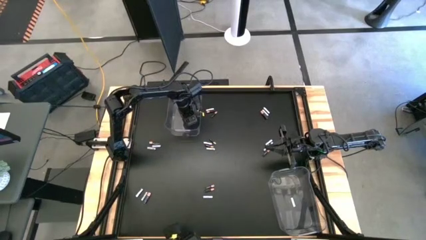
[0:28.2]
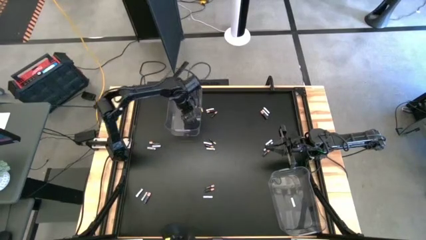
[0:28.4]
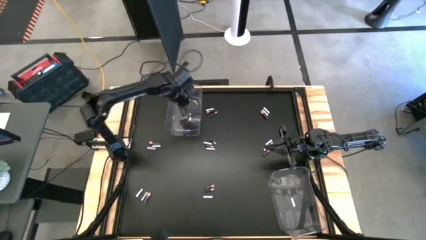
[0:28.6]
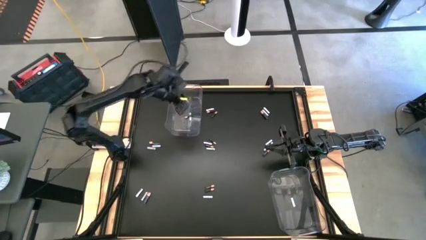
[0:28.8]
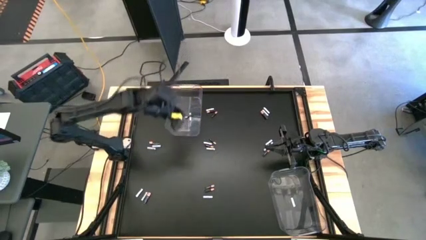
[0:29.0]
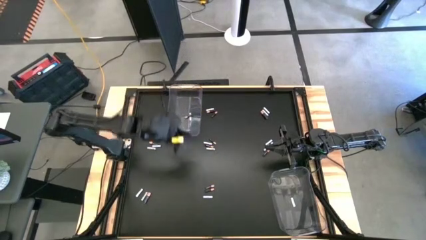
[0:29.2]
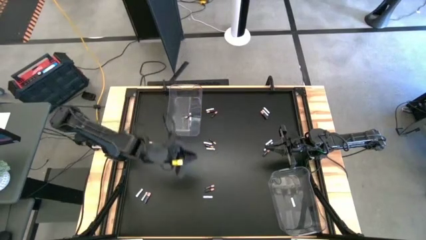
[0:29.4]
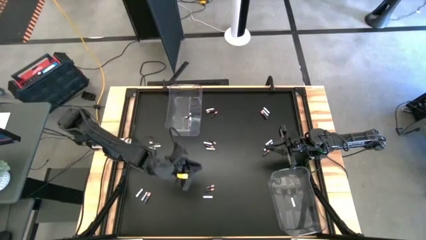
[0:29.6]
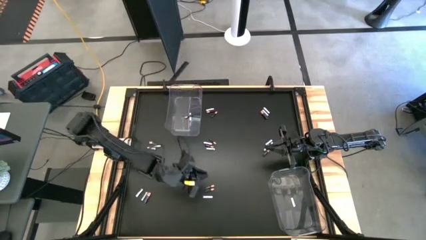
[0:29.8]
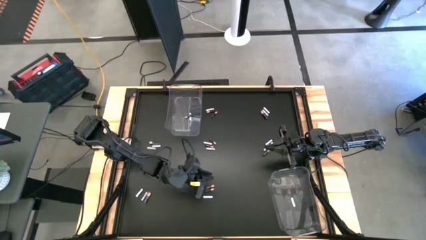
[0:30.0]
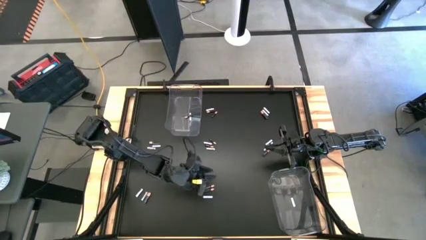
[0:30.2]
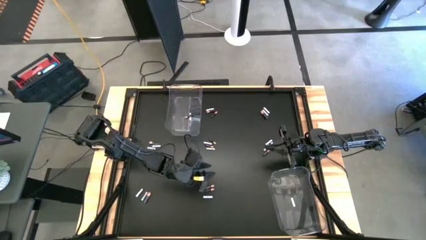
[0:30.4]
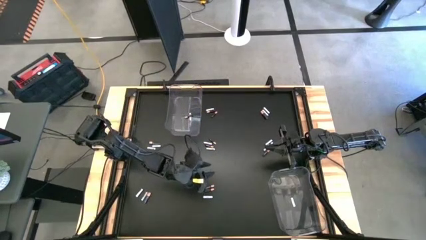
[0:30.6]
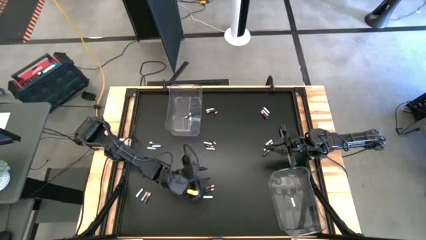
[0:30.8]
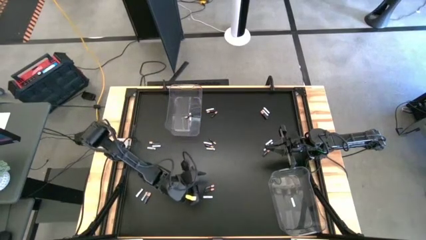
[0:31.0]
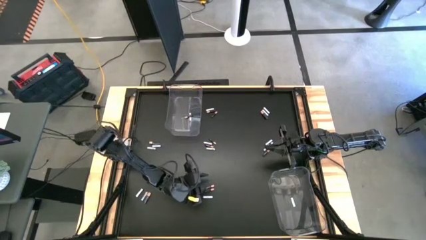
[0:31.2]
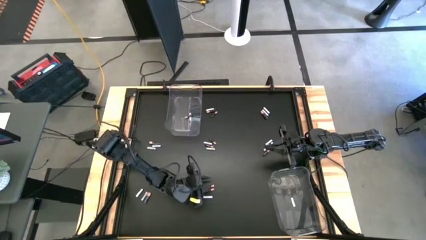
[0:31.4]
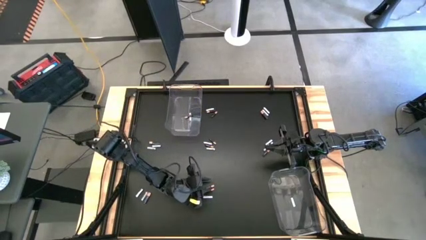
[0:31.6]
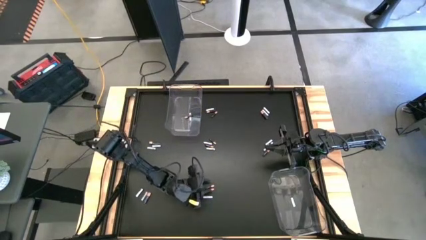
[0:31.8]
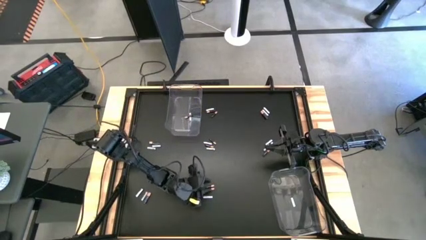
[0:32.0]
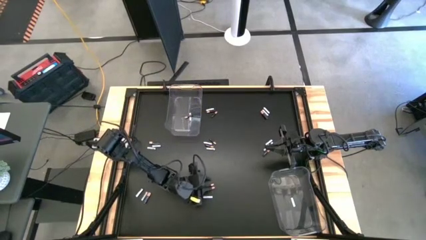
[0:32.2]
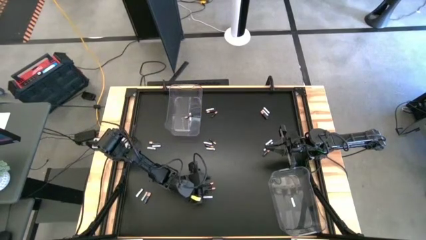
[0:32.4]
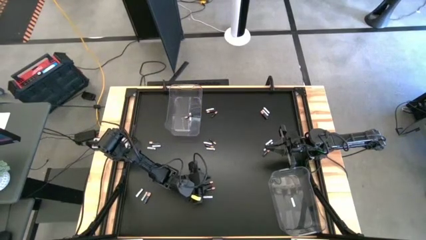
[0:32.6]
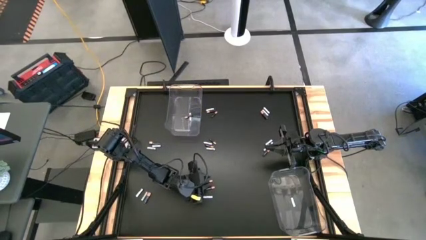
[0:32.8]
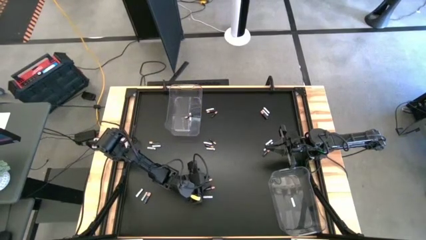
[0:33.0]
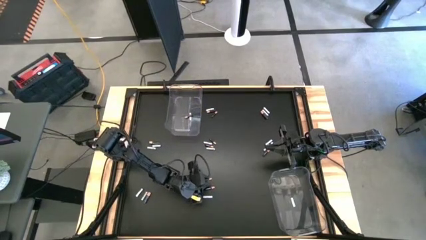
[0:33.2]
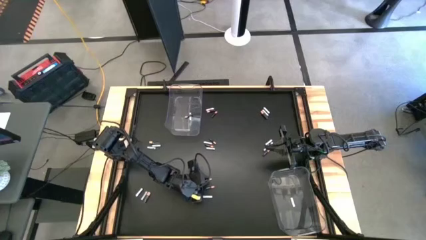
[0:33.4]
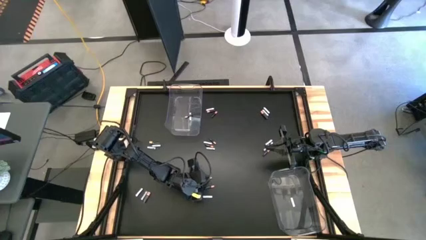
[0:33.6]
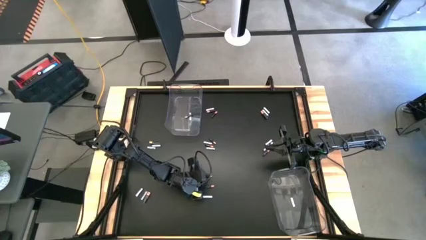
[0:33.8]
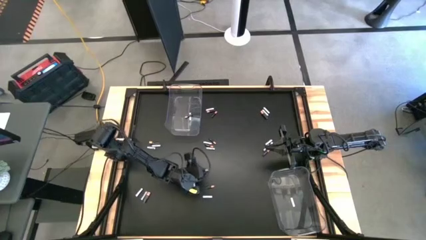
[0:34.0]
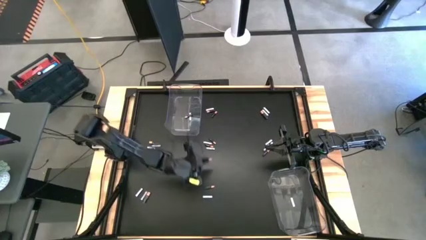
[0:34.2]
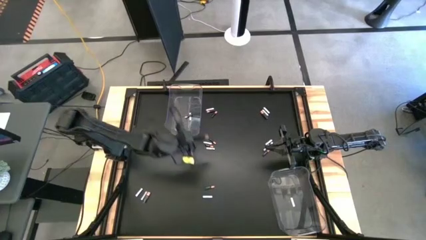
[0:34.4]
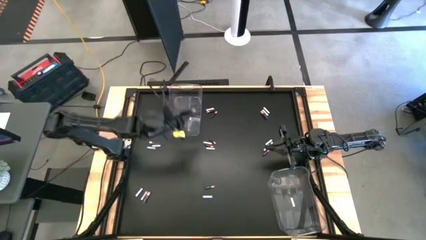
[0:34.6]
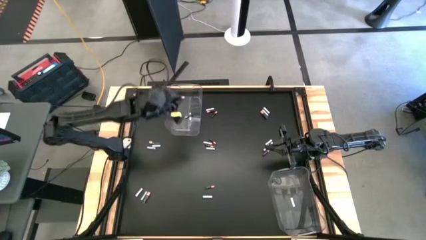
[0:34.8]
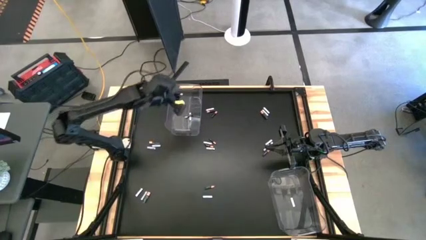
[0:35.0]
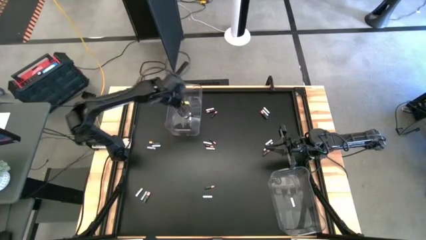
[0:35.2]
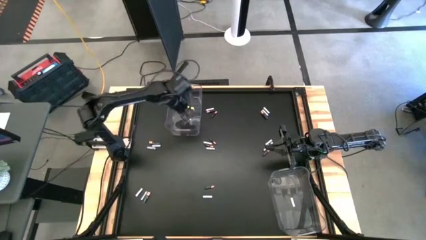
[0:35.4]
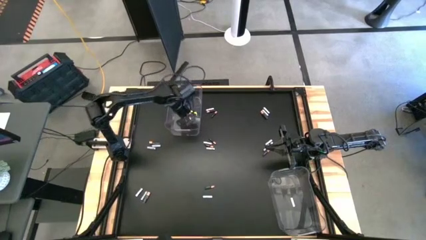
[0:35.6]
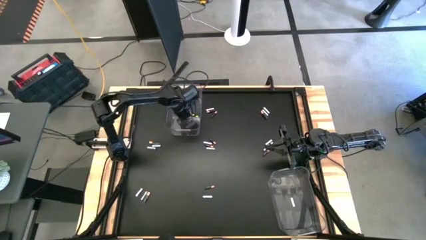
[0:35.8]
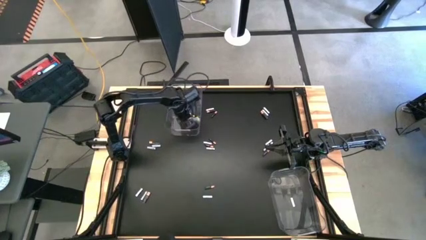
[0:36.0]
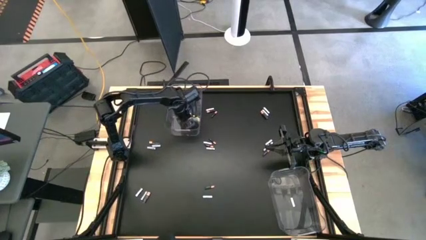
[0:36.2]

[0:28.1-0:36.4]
Task: Sort batteries
Put the black battery into the top transparent bin

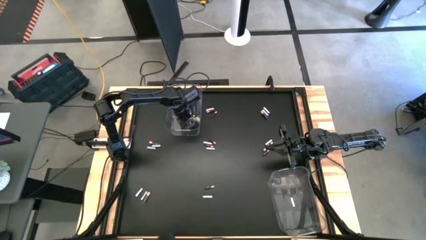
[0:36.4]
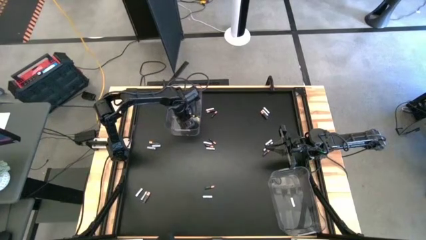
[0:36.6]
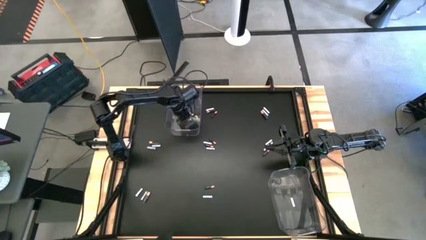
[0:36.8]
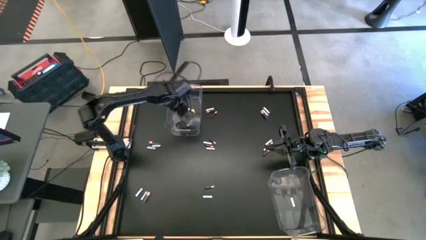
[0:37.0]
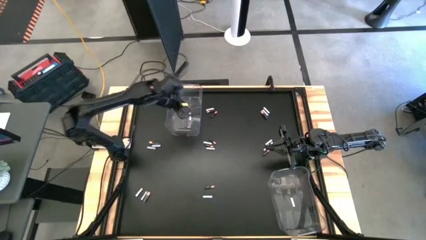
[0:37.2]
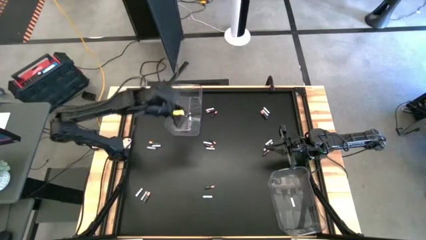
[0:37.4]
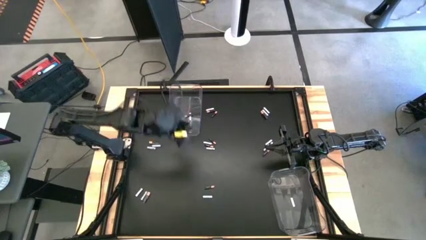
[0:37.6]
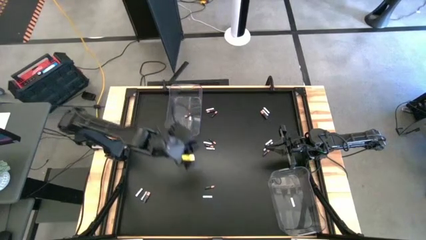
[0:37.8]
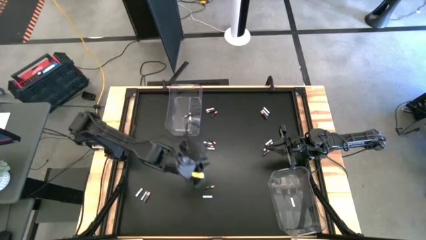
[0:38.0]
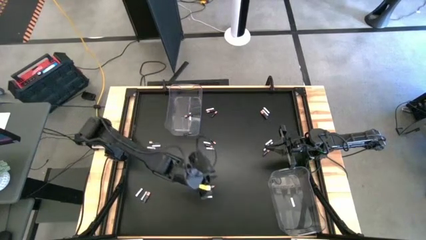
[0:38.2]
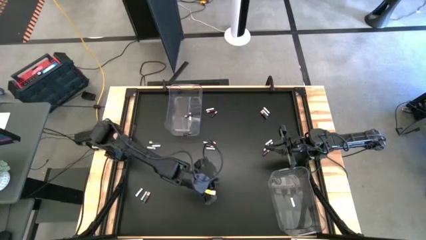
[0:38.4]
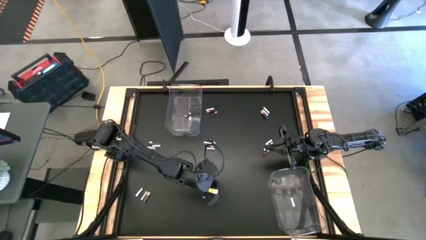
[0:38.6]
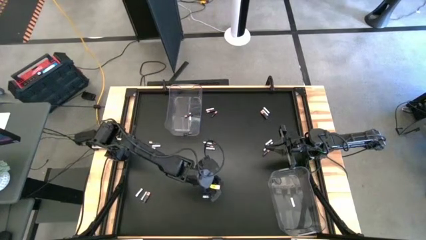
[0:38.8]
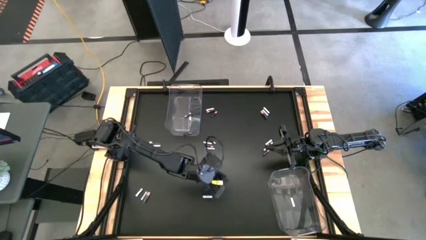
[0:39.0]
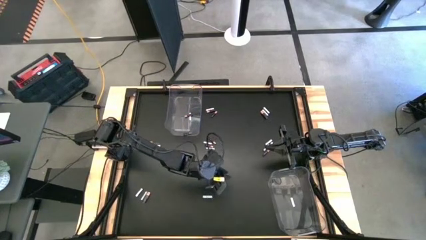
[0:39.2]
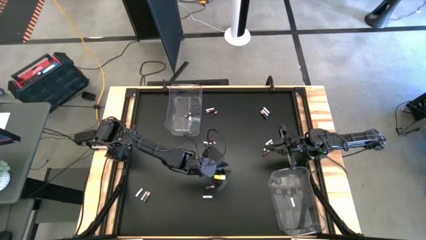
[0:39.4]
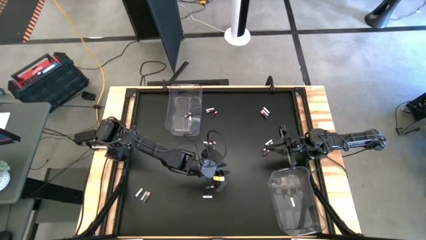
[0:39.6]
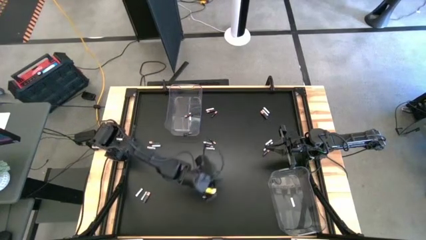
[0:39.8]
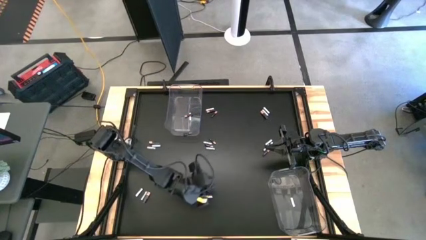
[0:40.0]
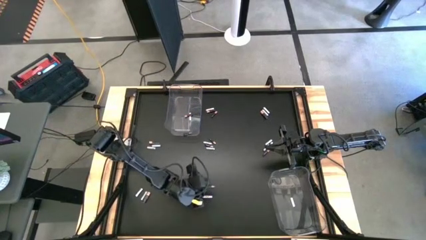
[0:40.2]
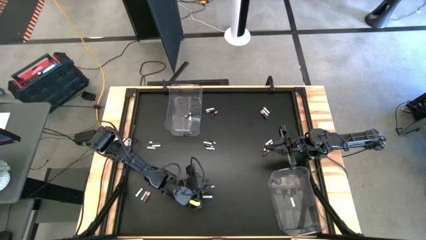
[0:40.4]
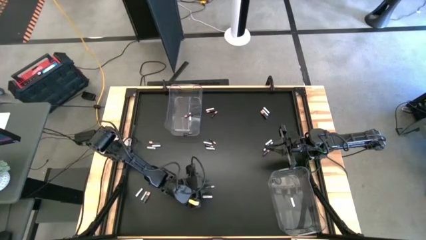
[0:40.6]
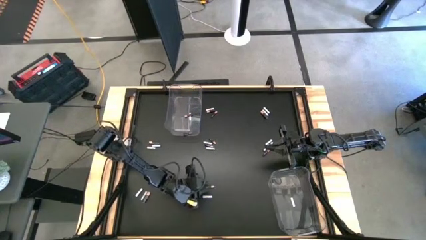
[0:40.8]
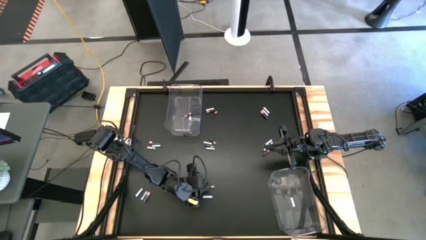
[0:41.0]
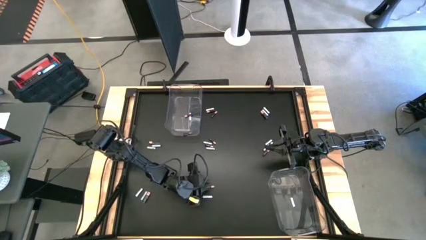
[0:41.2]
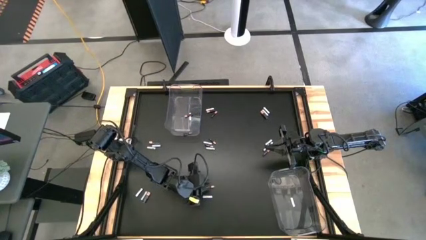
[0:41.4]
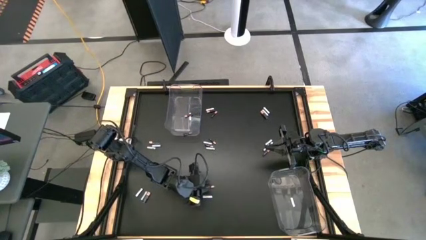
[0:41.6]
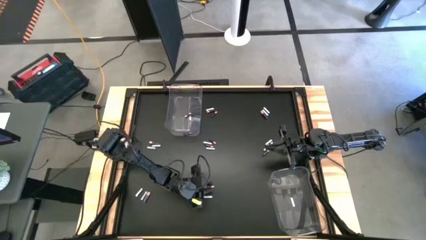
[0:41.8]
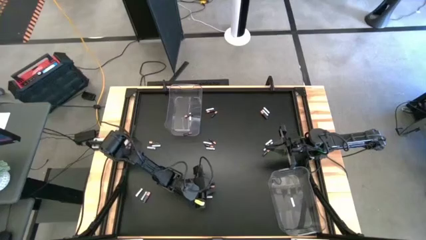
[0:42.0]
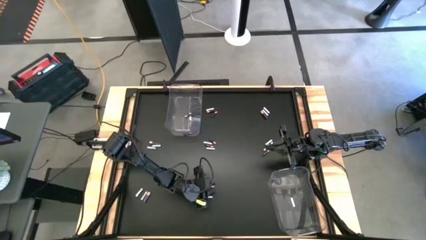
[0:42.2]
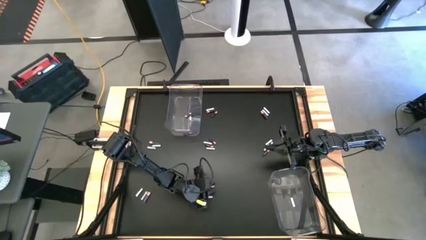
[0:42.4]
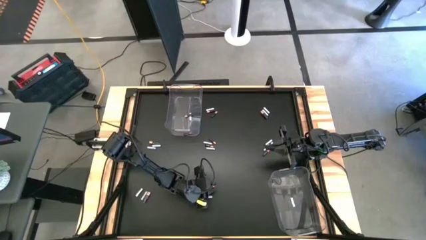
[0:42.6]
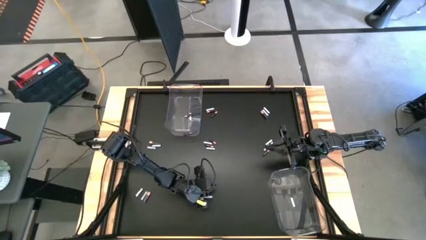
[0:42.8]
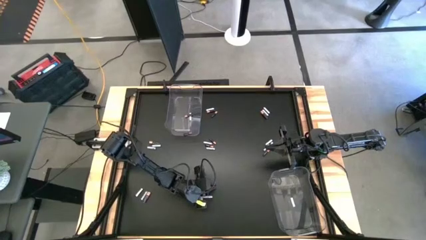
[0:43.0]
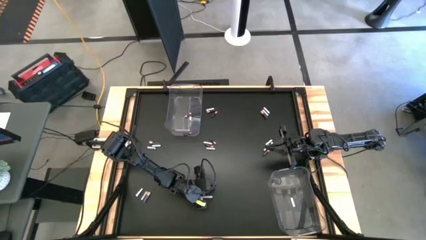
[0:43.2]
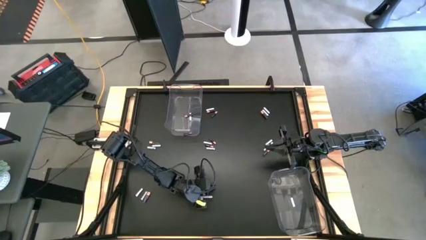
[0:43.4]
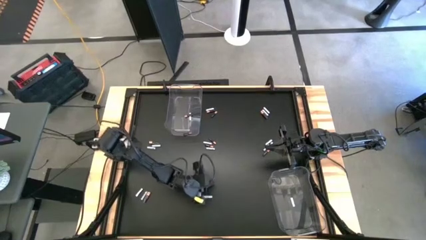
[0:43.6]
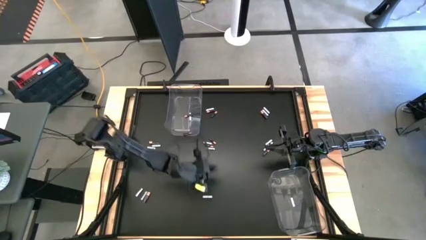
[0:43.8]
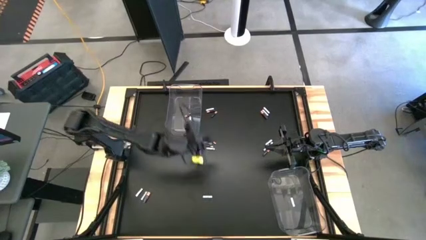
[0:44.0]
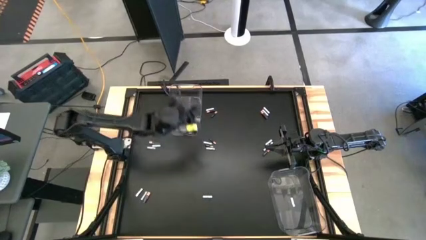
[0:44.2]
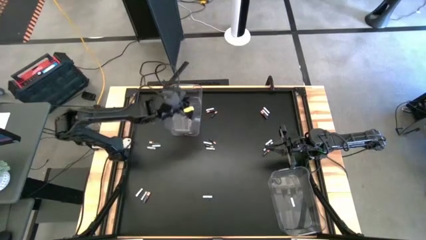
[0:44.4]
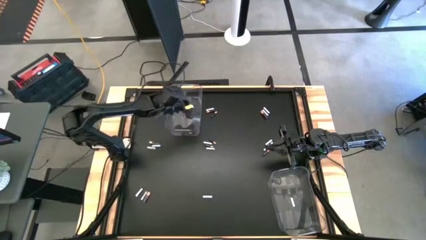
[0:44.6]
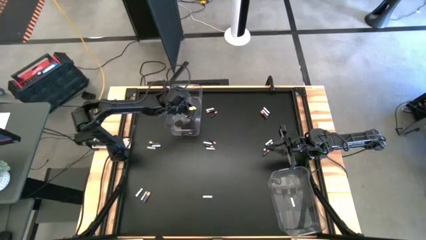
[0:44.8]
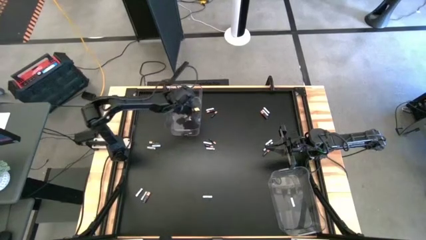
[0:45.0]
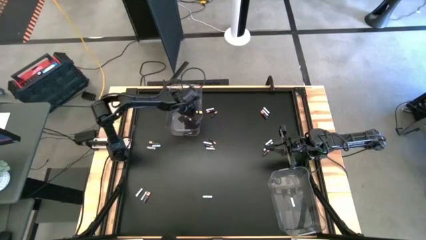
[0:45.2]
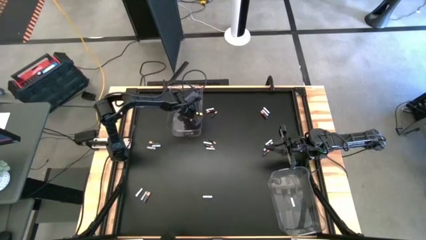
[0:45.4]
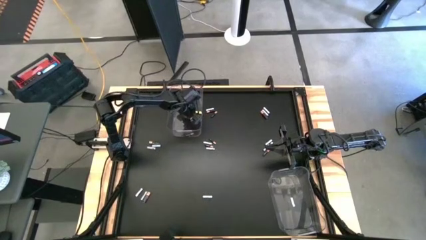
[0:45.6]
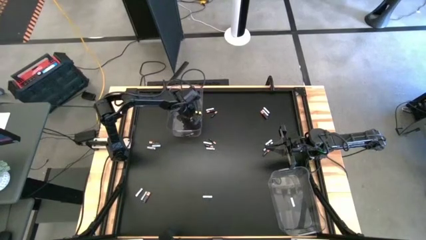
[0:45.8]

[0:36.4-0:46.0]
Put the black battery into the top transparent bin
